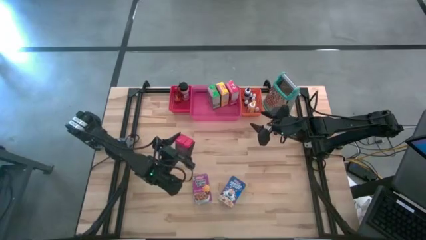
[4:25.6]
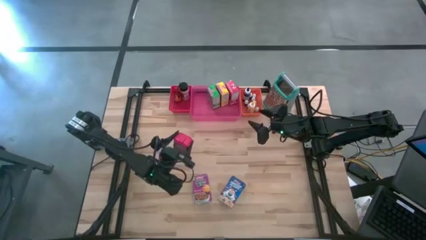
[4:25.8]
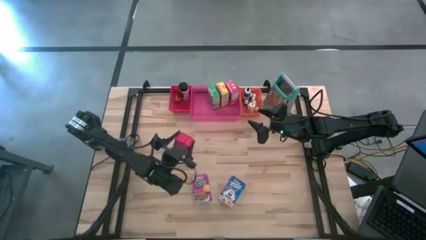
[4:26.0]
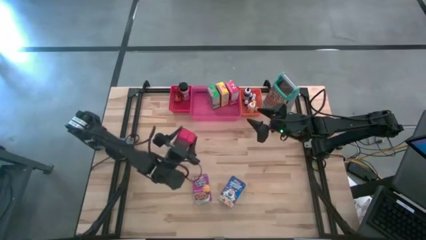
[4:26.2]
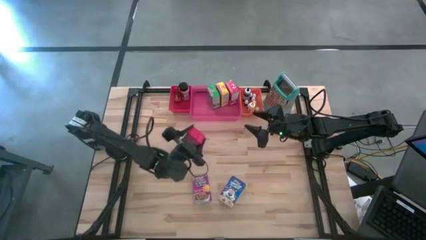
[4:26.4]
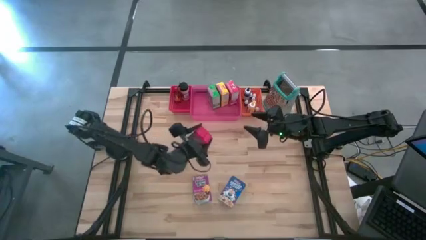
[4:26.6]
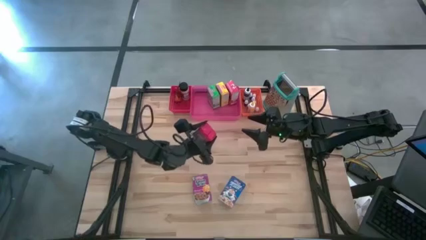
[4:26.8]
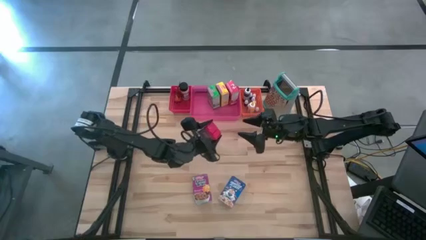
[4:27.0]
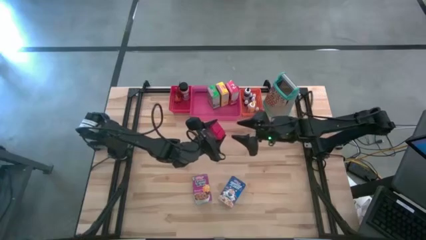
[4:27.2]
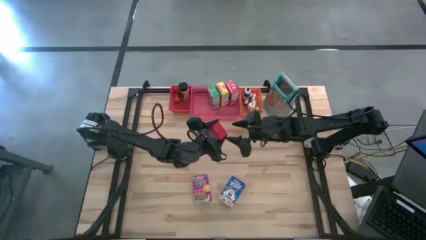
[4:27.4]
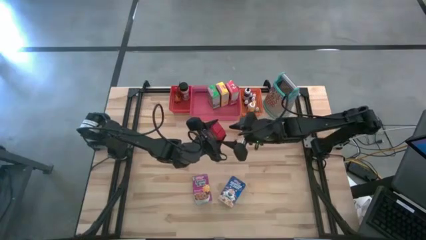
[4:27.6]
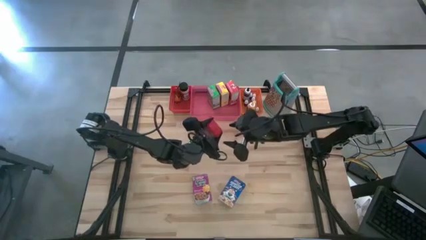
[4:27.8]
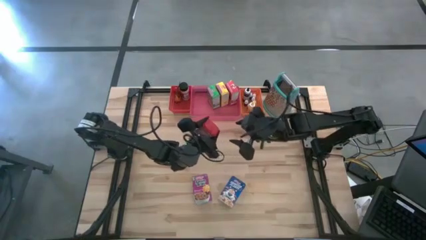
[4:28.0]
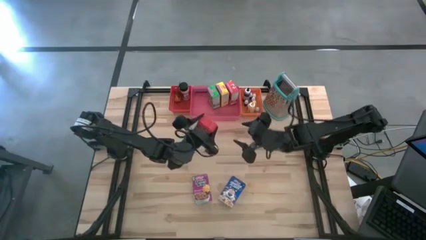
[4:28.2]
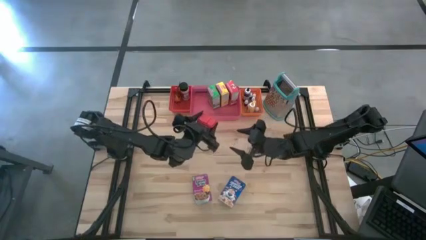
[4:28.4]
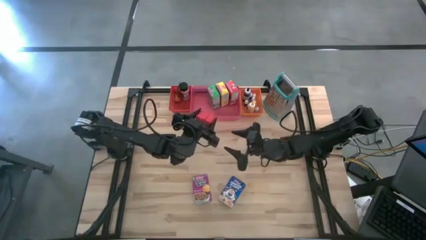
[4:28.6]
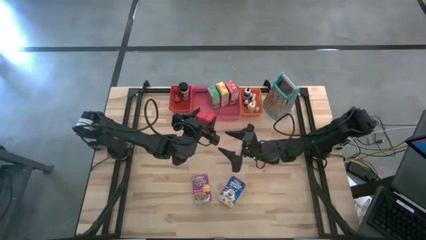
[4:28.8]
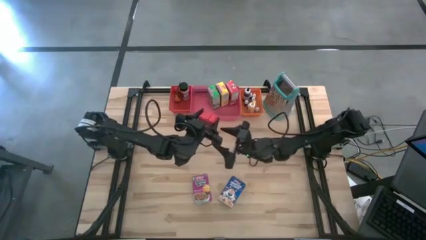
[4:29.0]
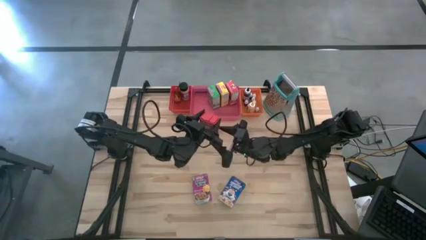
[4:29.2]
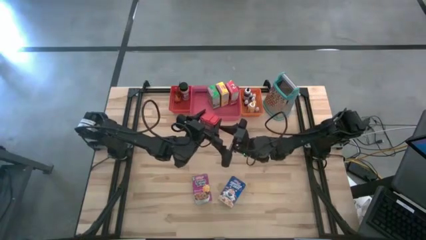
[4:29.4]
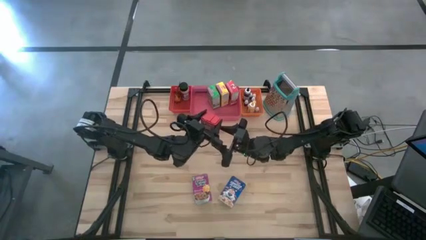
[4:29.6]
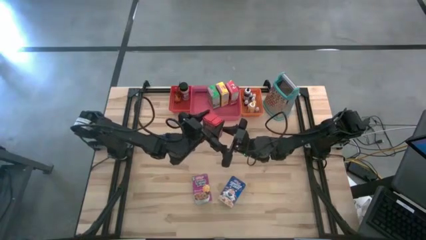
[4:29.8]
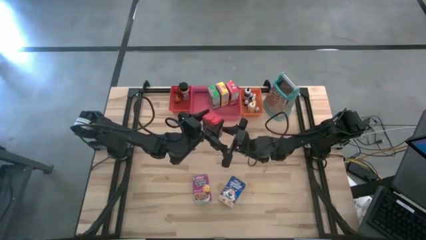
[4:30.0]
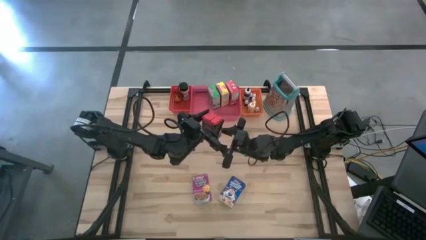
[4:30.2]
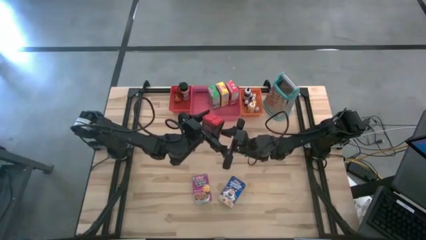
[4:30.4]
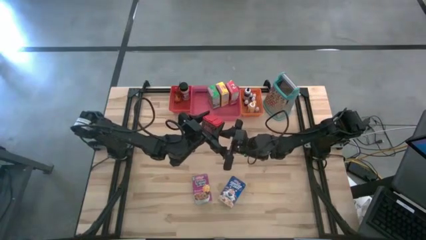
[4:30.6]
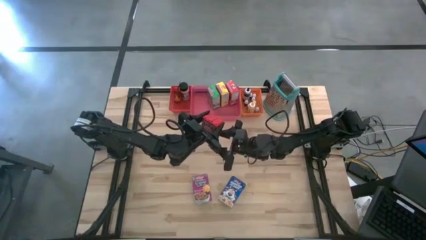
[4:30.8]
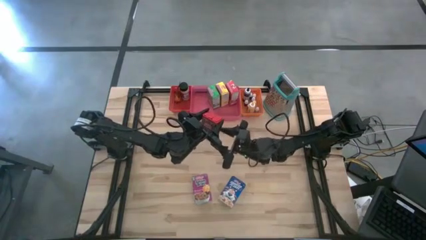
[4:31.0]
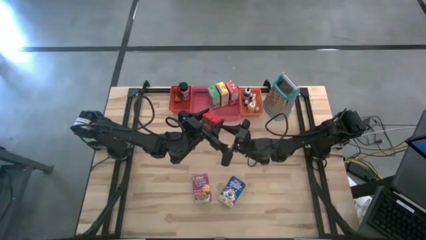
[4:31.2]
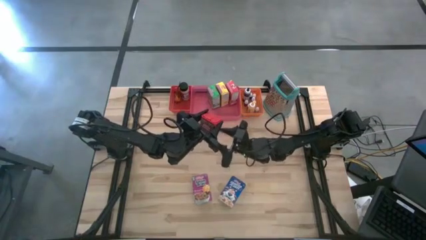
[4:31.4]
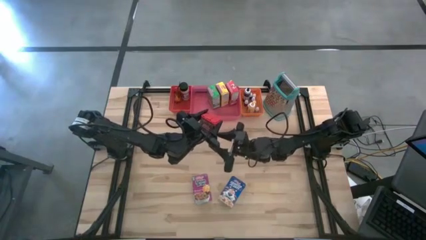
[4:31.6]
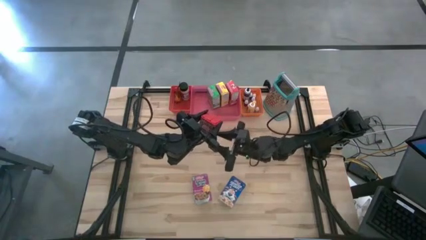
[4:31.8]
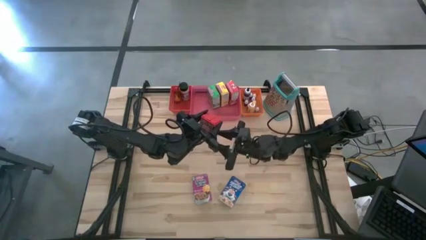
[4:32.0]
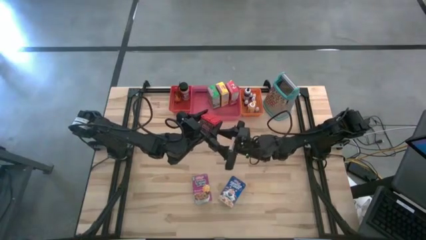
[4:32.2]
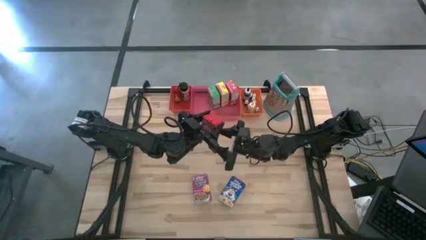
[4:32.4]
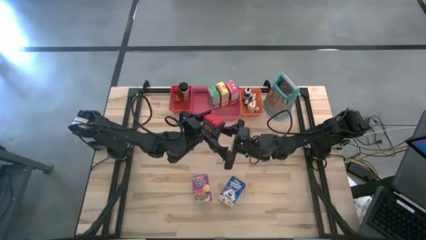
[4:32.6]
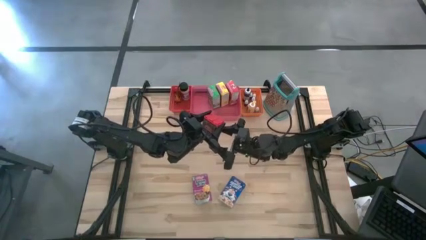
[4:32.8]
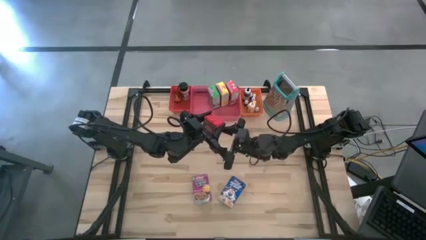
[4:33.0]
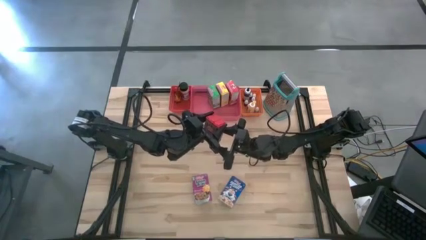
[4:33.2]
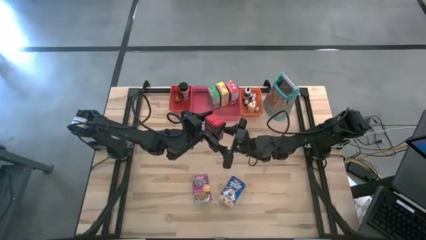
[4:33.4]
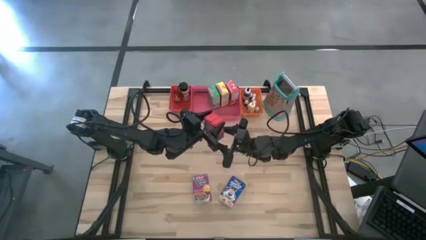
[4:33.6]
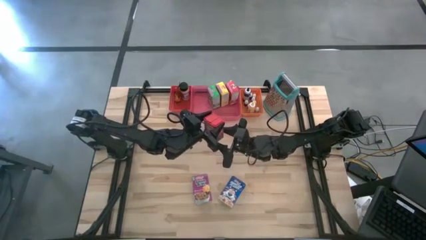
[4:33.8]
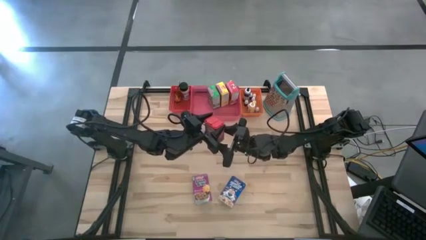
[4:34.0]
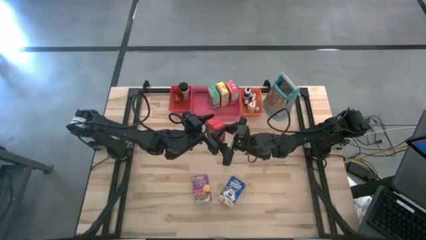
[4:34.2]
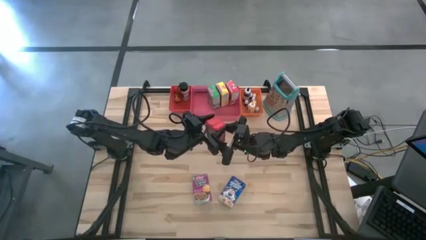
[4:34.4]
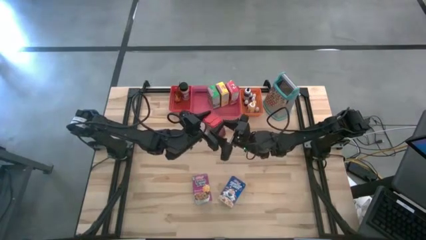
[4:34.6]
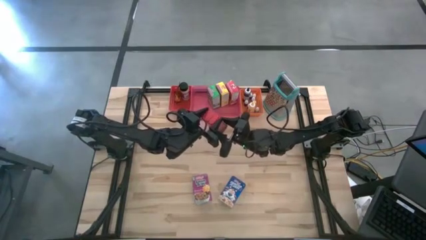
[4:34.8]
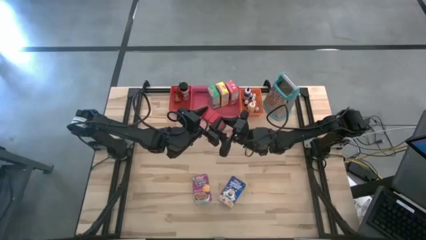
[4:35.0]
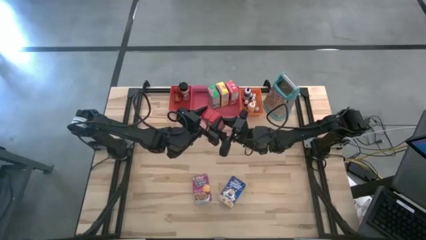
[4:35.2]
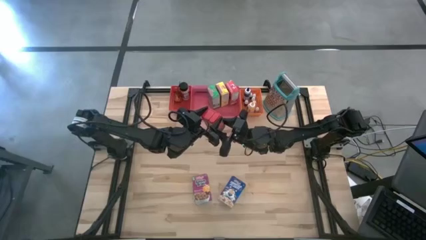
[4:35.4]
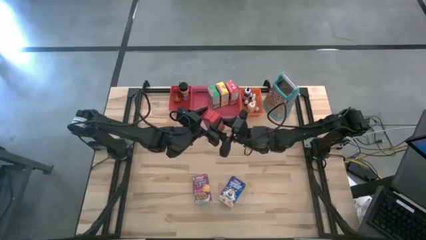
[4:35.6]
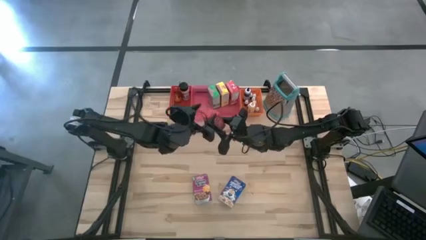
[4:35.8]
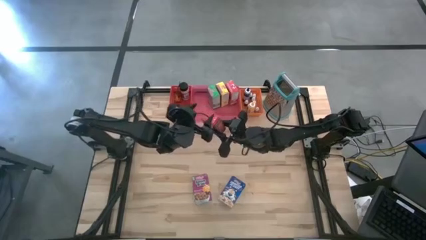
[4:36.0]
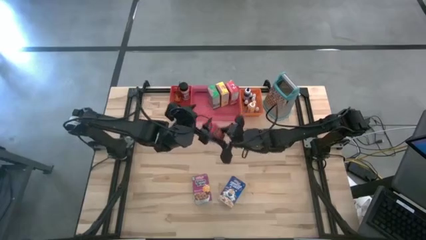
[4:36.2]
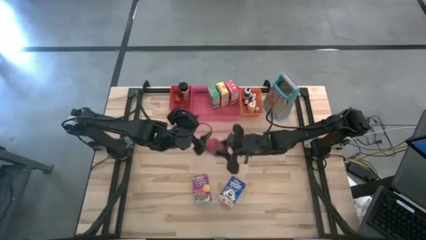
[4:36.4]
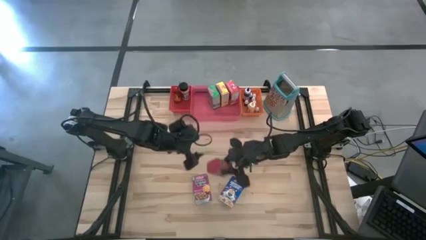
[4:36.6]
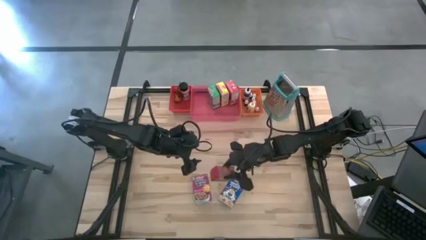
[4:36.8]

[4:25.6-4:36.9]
Task: Pick & Place Kitchen Items
Put the red seasoning can into the red bin

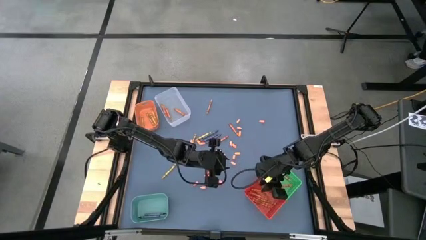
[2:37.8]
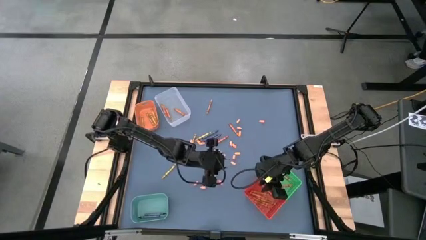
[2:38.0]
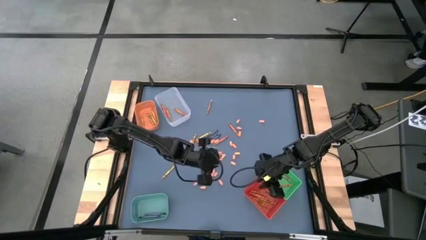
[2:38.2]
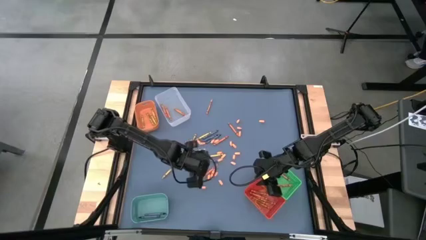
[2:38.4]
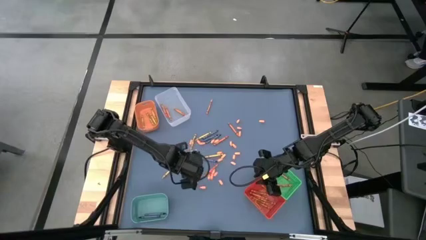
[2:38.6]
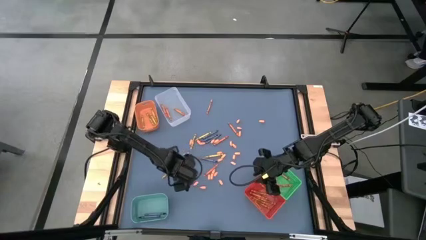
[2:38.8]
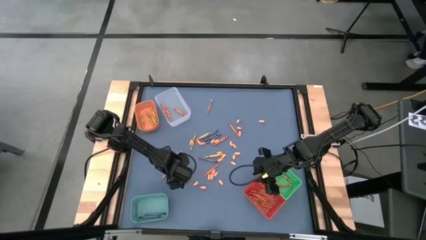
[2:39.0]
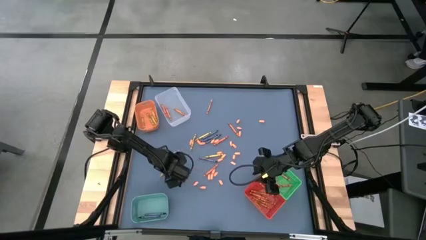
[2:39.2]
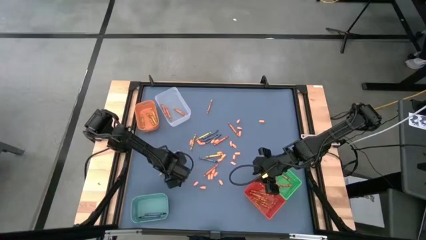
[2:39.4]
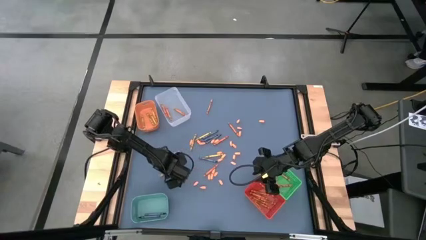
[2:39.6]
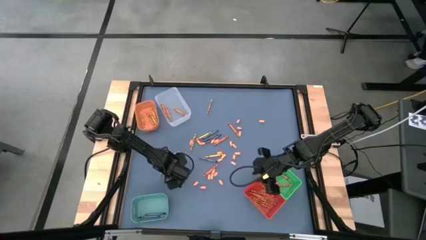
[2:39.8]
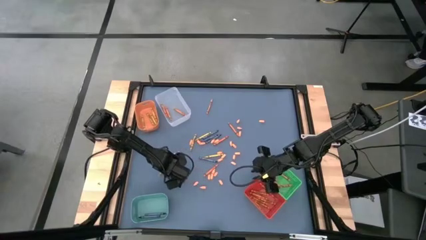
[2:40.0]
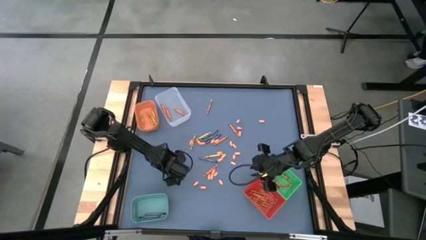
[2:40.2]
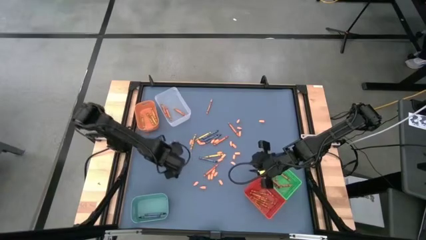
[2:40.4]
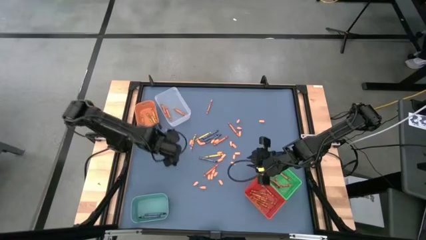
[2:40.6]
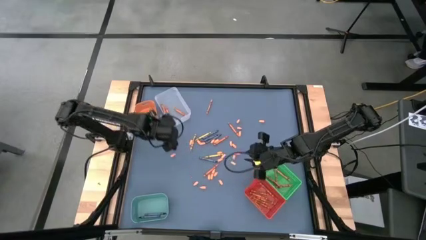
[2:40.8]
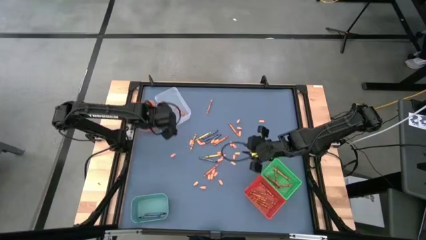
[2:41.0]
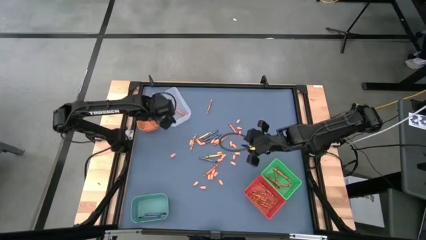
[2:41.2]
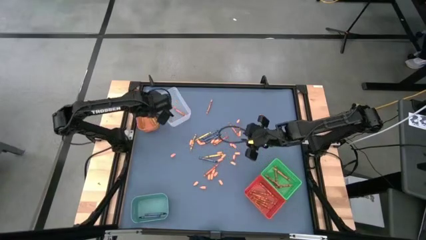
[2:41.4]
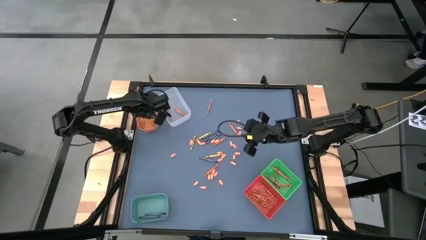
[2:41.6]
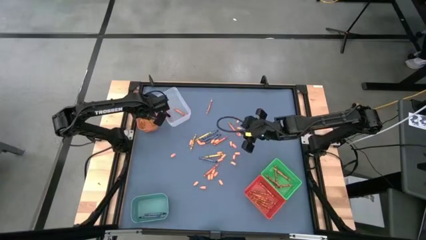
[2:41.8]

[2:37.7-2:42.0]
Task: Sort crayons
Put the yellow crayon into the orange bin

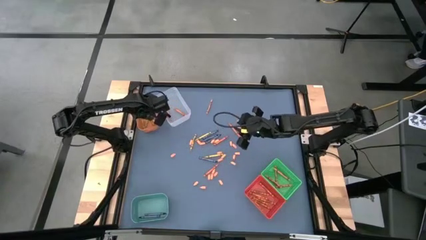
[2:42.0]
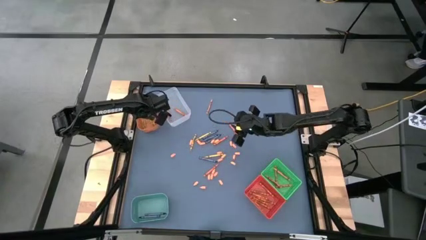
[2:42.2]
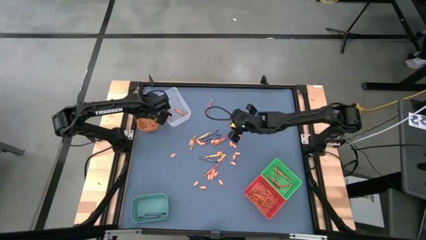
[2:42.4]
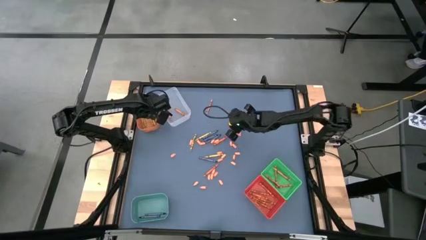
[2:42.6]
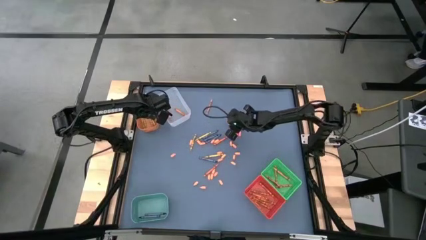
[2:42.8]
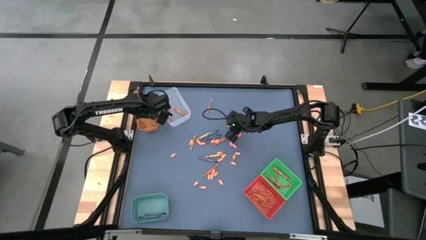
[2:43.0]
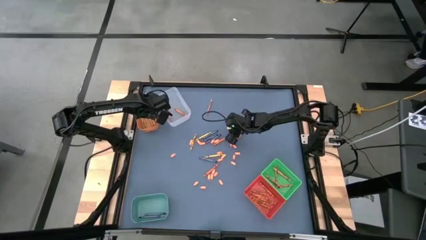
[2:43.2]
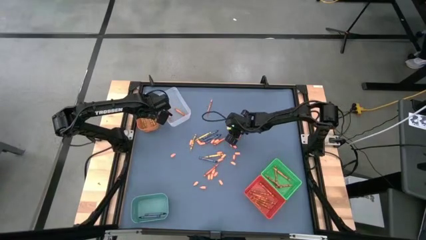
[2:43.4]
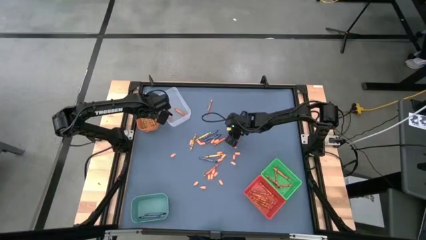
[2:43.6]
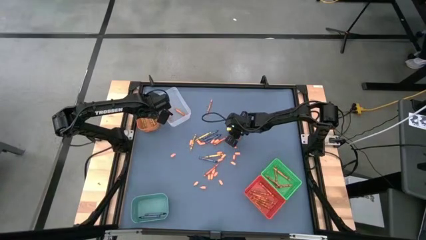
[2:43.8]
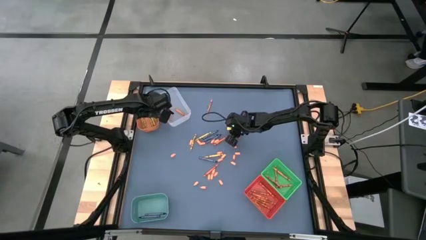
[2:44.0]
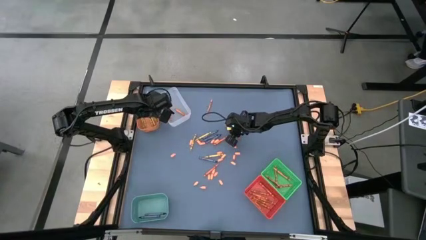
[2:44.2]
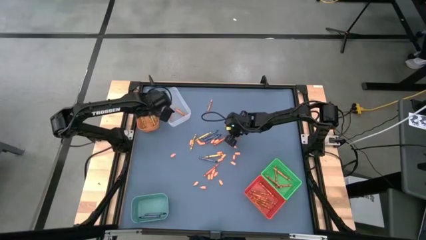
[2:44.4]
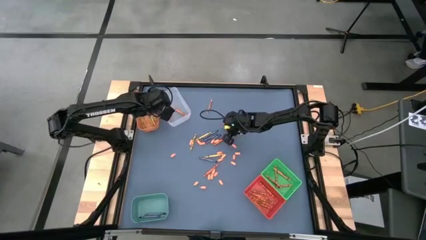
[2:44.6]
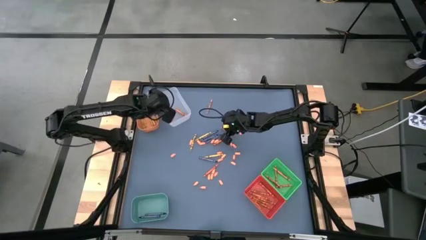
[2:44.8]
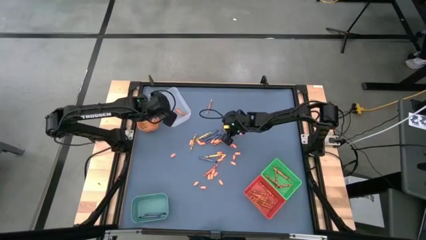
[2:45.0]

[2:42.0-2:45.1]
Put the orange crayon into the transparent bin
